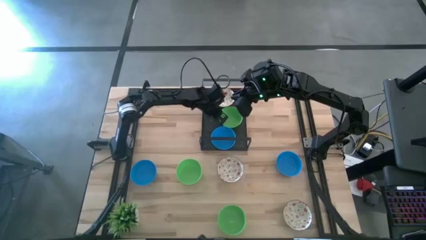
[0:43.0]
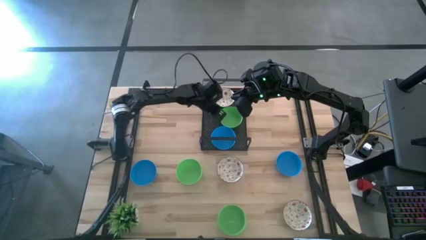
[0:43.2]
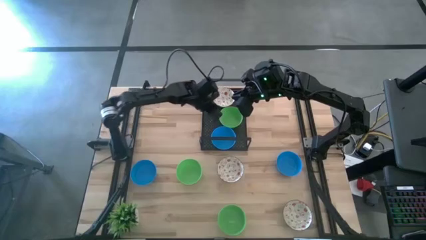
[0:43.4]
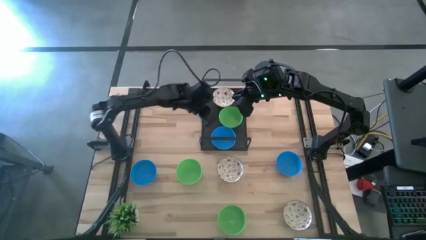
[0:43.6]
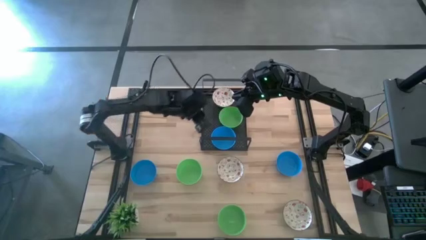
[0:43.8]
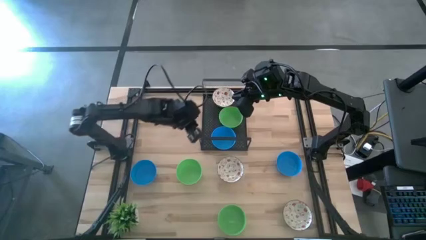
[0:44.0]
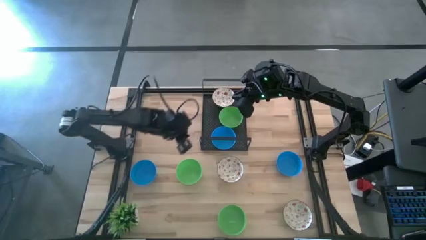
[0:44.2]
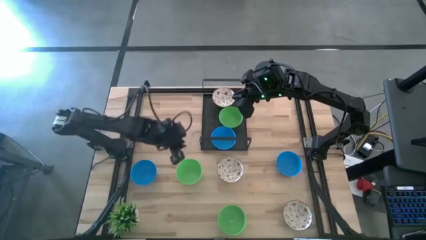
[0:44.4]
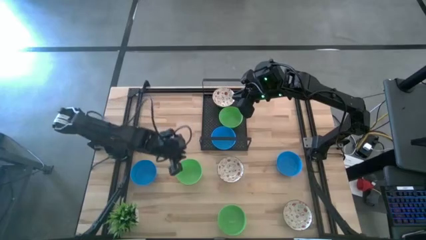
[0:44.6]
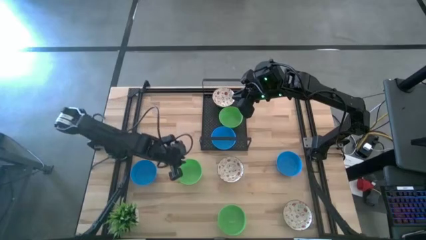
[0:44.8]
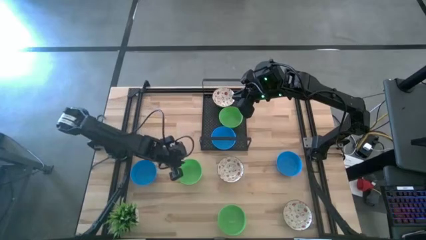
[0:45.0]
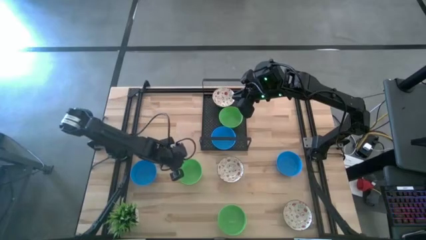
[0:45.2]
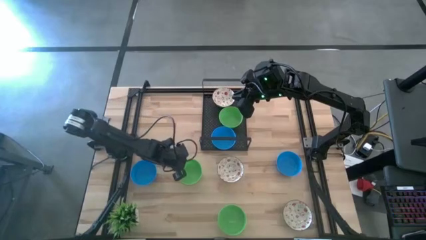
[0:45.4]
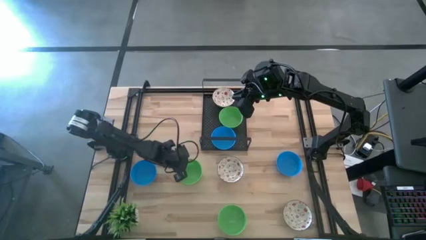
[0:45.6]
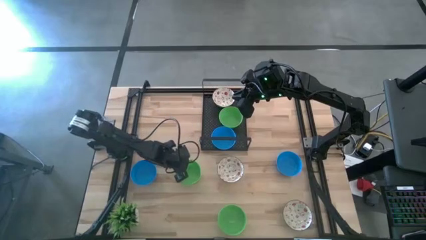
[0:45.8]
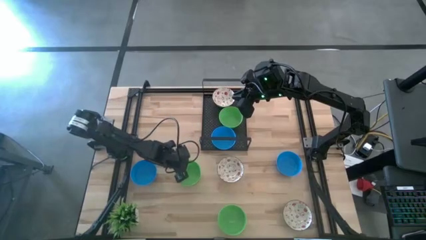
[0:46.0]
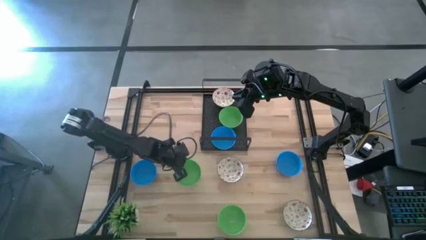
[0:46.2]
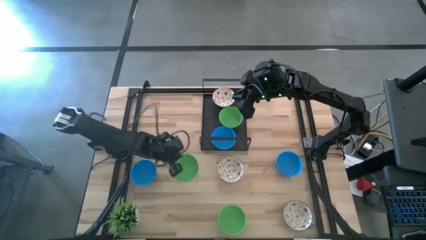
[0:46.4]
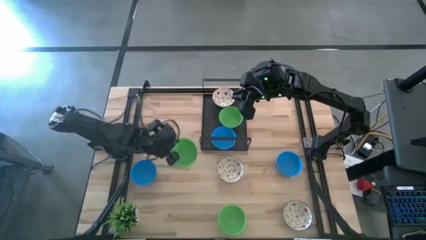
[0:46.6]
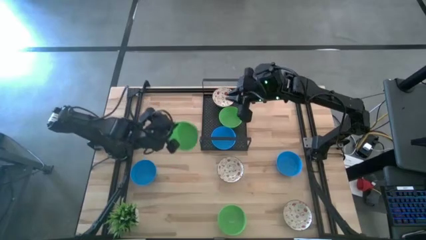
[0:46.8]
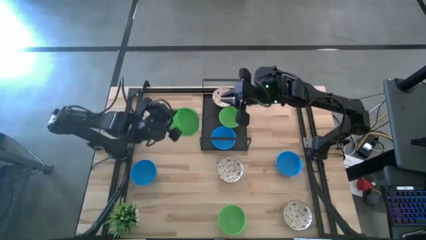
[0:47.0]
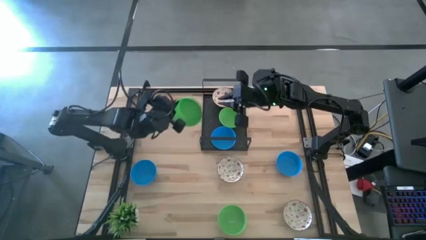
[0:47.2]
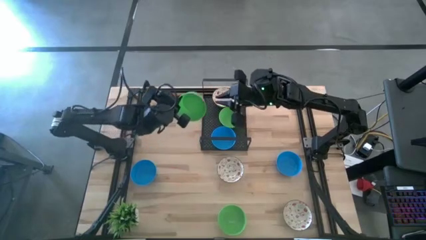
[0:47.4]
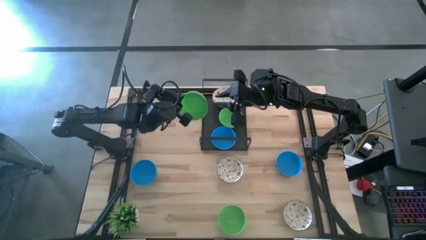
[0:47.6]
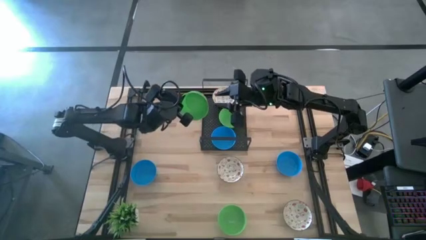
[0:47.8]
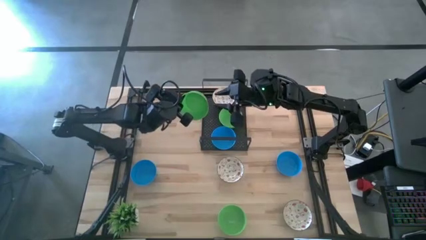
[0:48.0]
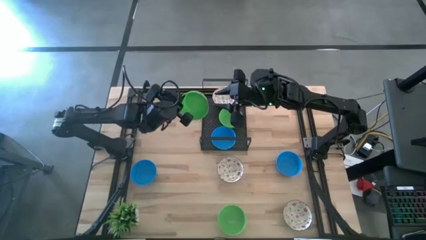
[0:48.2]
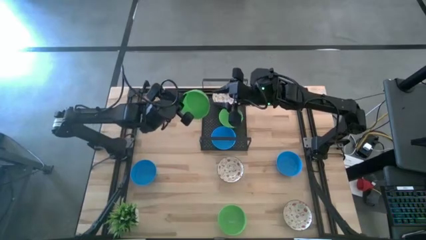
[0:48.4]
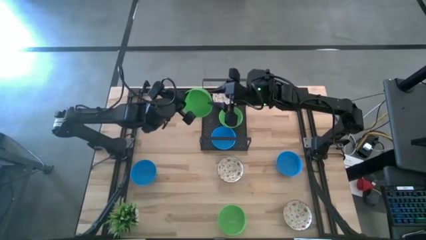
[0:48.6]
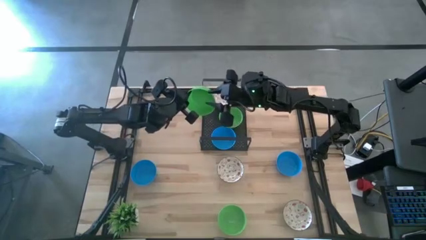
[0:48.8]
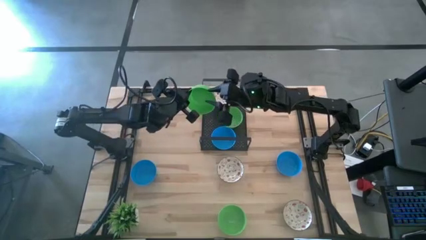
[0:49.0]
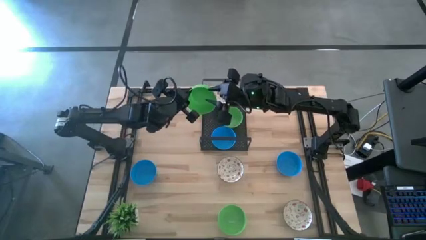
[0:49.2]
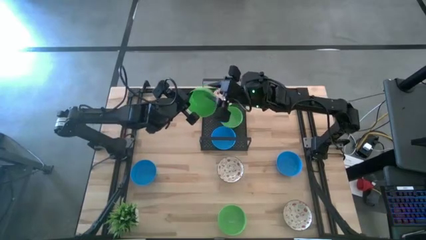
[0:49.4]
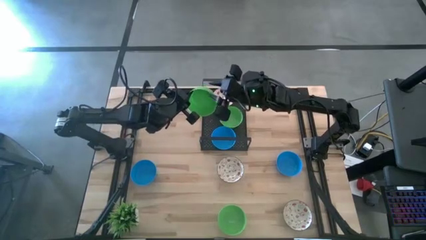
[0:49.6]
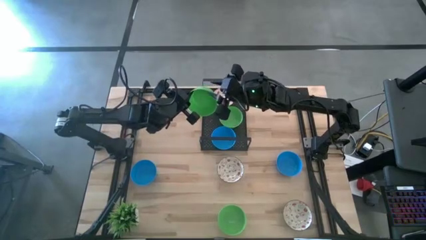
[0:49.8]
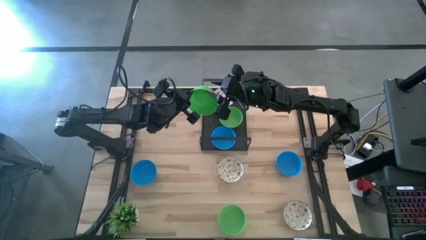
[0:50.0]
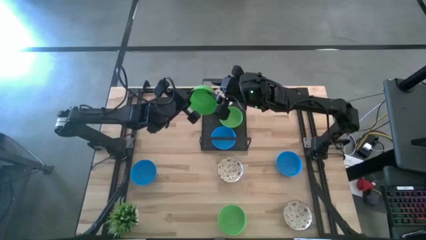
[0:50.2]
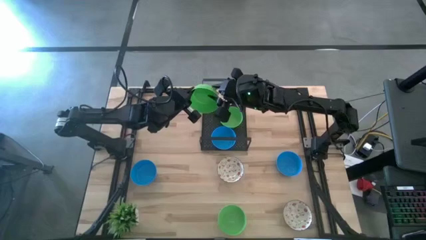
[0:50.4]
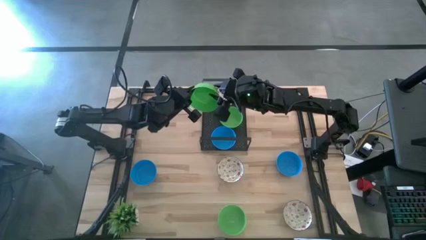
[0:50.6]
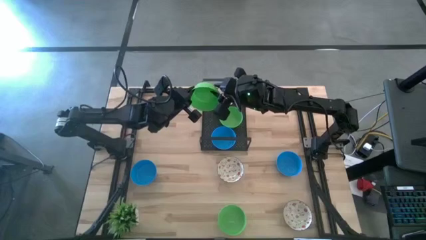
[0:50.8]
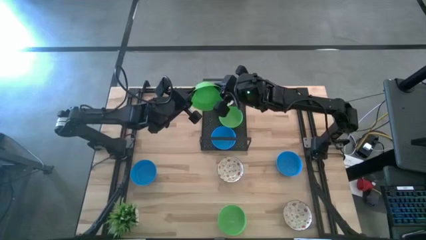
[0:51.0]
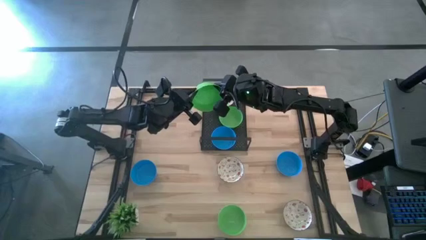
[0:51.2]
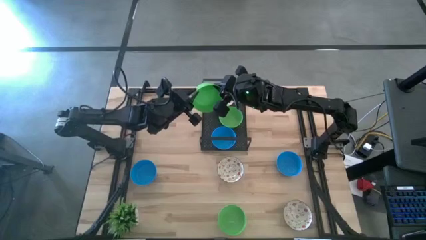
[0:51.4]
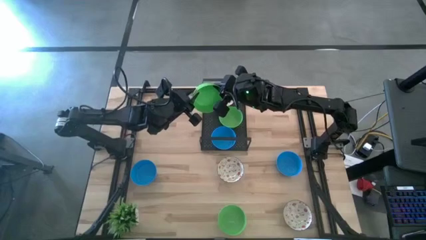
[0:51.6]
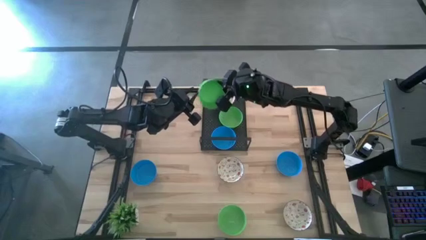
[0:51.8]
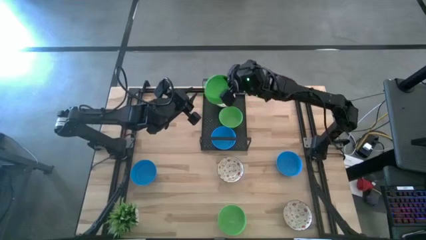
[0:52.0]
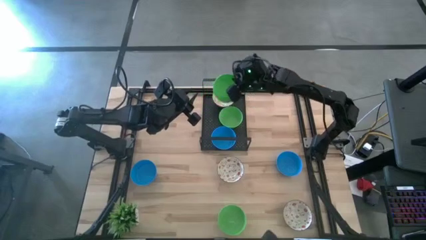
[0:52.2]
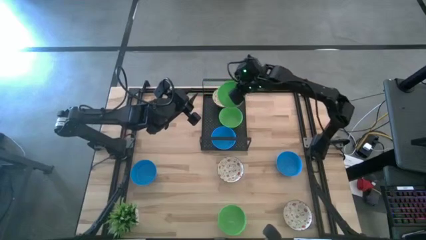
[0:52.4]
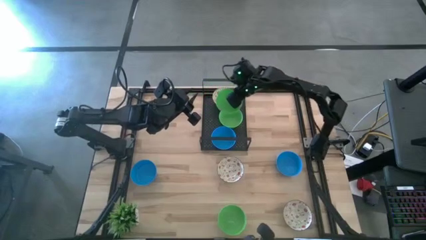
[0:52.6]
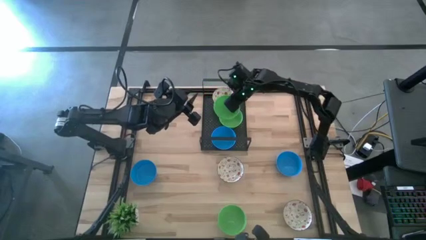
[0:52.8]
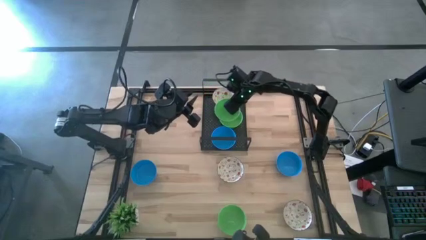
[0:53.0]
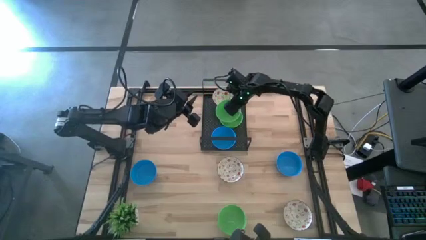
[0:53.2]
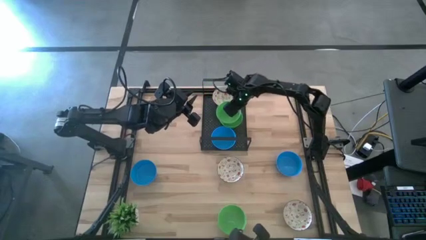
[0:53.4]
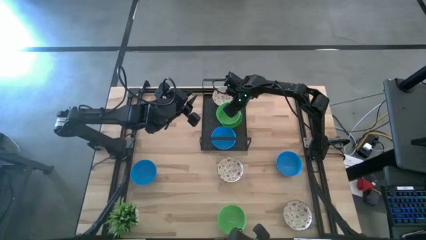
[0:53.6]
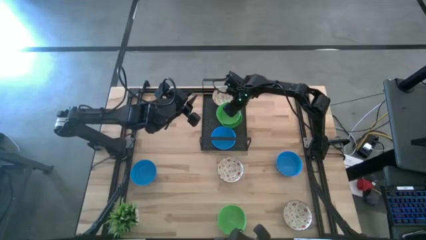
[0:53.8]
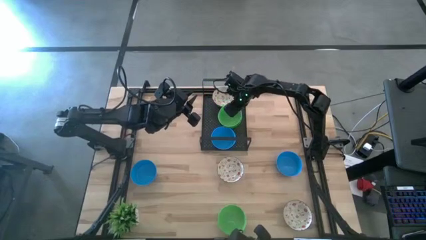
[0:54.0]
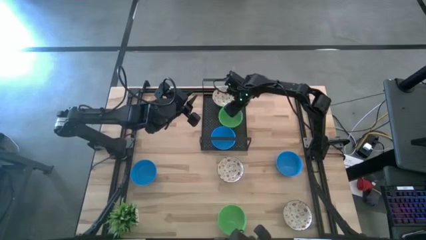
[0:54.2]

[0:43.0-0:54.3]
Task: Pick & Place Mini bowls
Stack the top green bowl on the green bowl on the shelf
